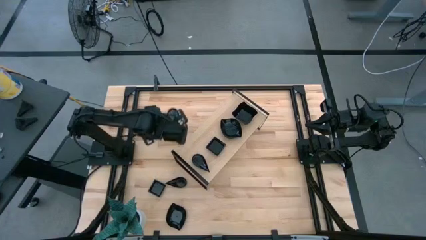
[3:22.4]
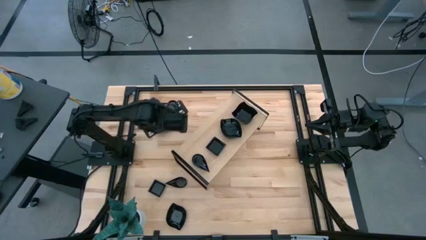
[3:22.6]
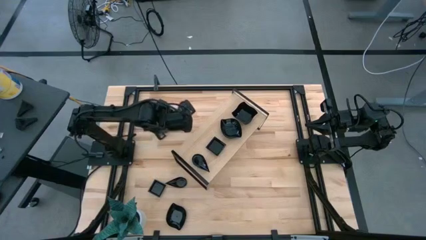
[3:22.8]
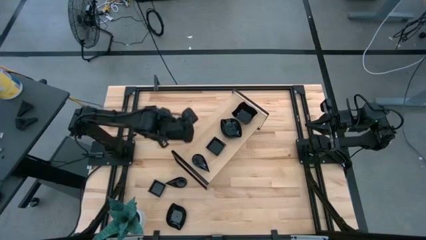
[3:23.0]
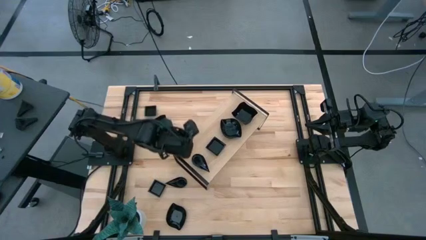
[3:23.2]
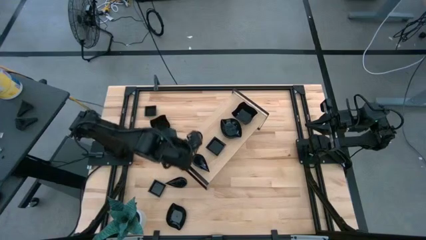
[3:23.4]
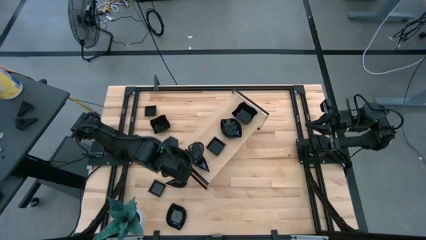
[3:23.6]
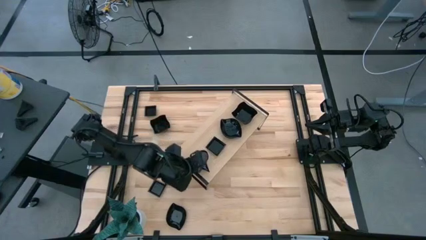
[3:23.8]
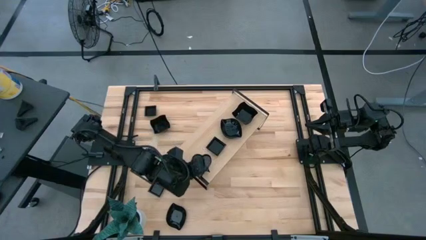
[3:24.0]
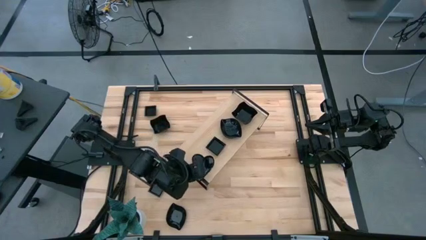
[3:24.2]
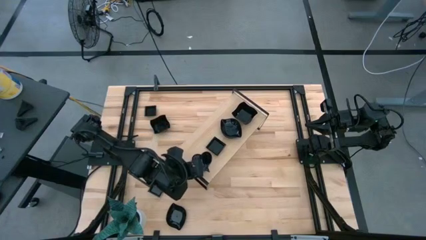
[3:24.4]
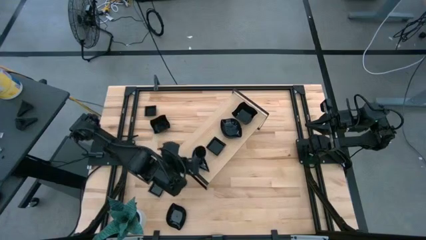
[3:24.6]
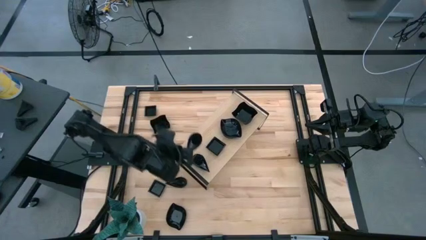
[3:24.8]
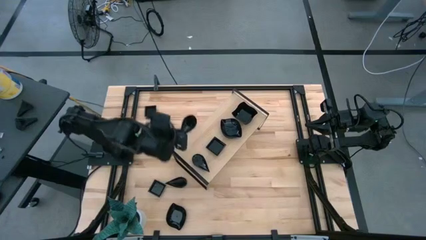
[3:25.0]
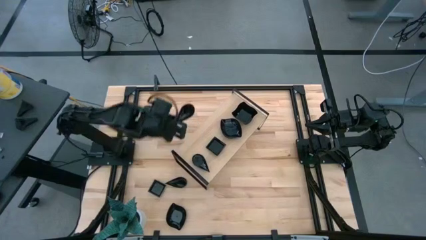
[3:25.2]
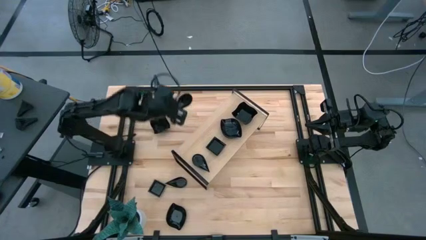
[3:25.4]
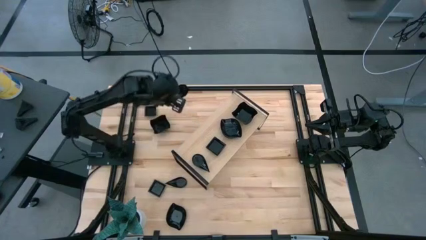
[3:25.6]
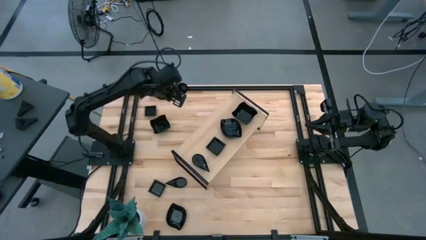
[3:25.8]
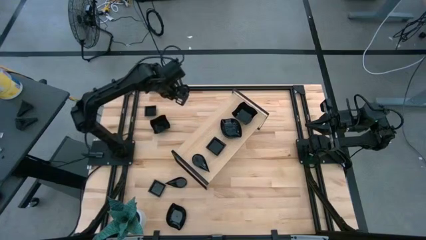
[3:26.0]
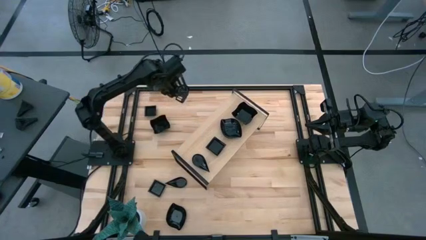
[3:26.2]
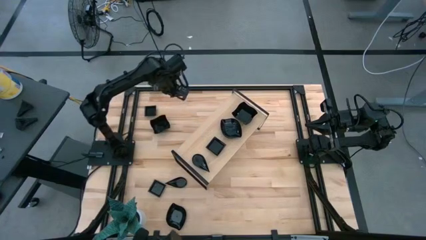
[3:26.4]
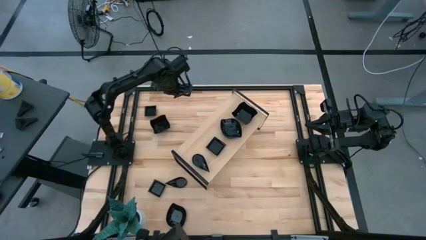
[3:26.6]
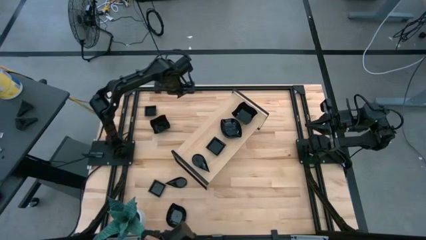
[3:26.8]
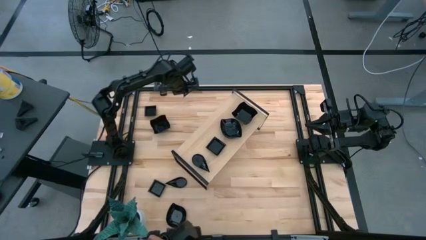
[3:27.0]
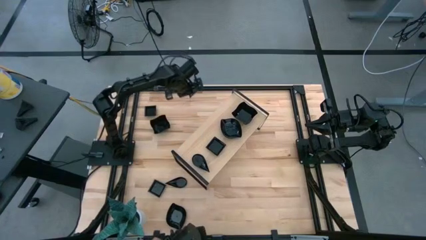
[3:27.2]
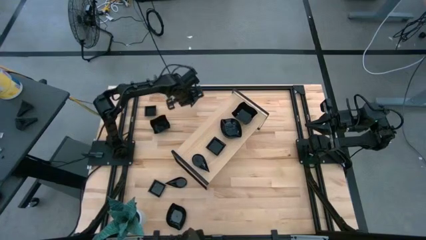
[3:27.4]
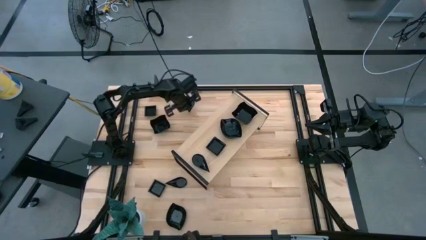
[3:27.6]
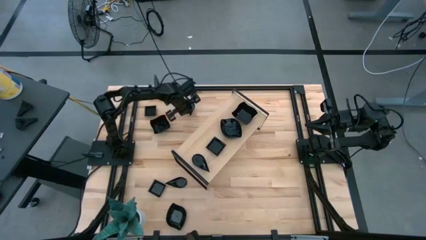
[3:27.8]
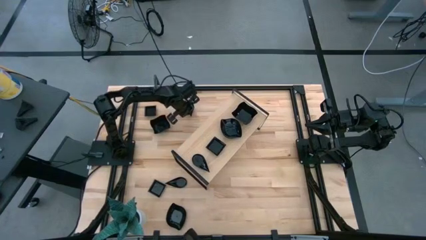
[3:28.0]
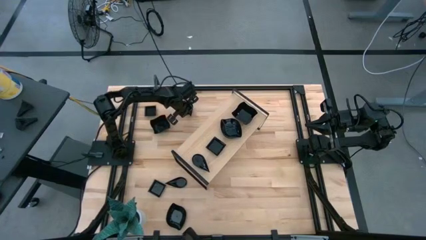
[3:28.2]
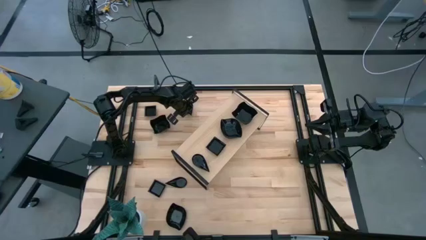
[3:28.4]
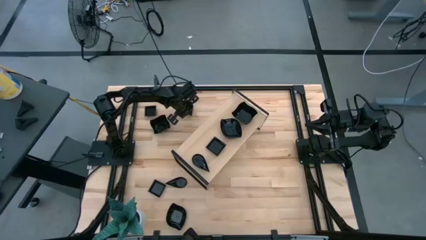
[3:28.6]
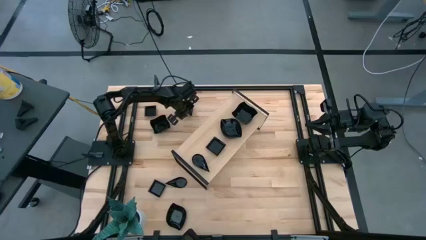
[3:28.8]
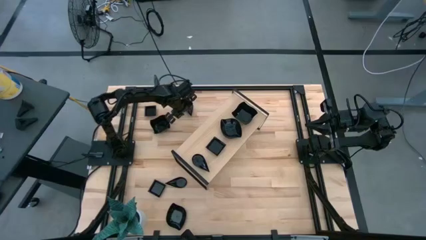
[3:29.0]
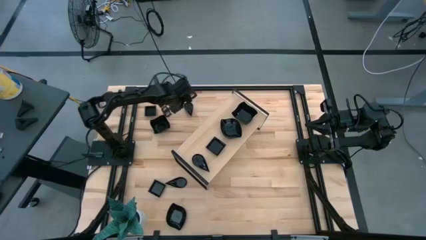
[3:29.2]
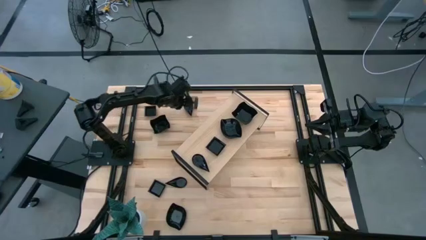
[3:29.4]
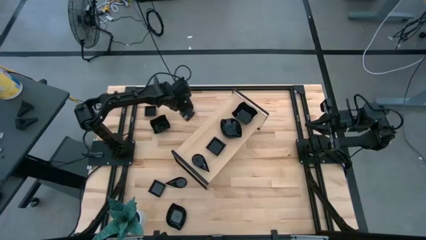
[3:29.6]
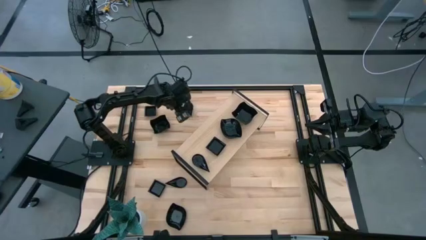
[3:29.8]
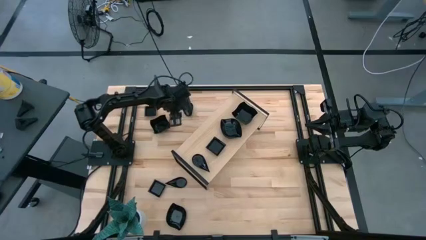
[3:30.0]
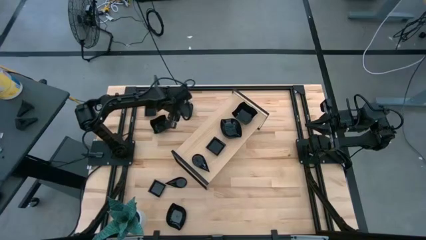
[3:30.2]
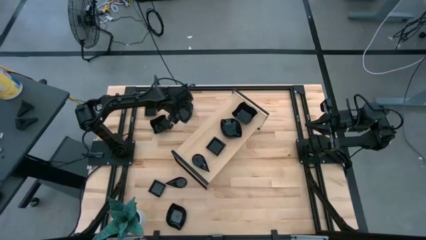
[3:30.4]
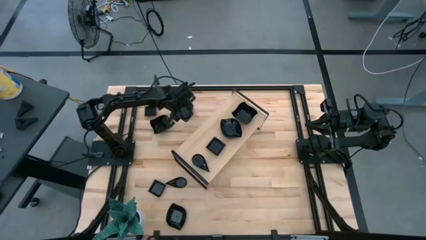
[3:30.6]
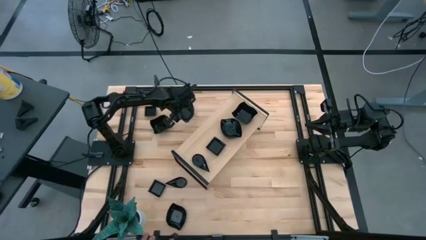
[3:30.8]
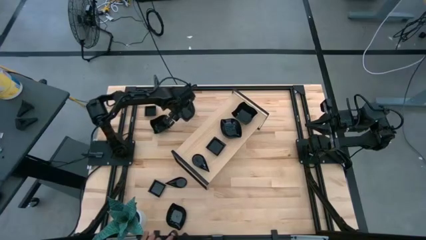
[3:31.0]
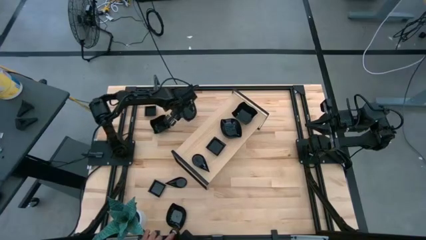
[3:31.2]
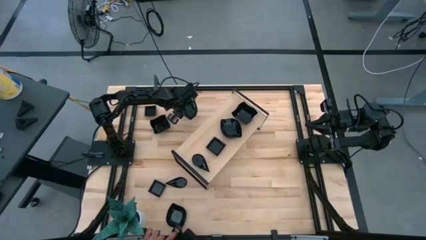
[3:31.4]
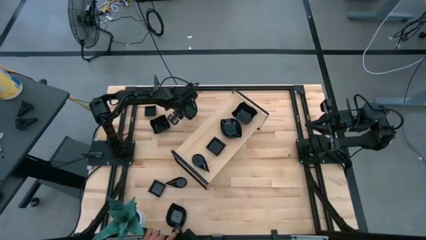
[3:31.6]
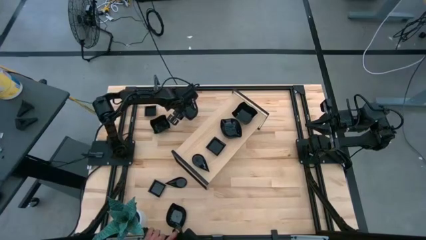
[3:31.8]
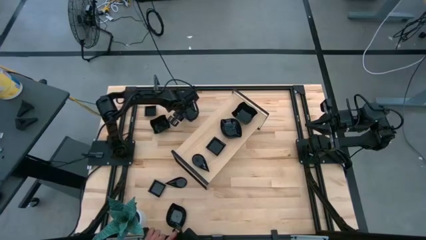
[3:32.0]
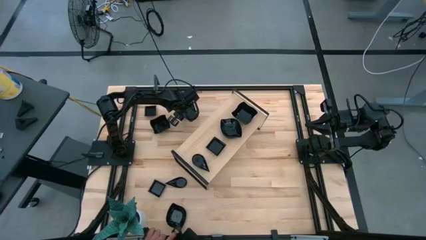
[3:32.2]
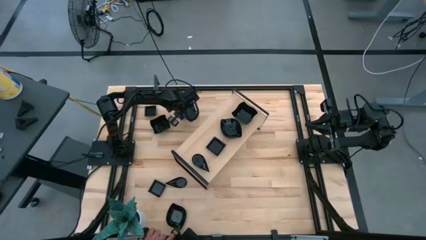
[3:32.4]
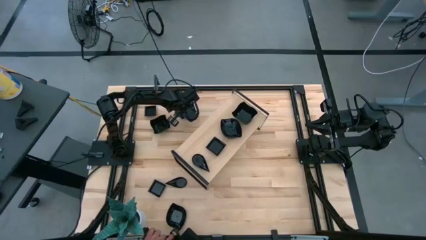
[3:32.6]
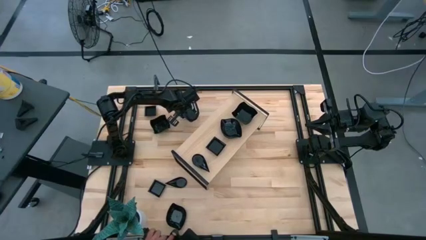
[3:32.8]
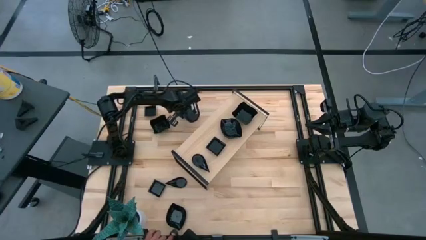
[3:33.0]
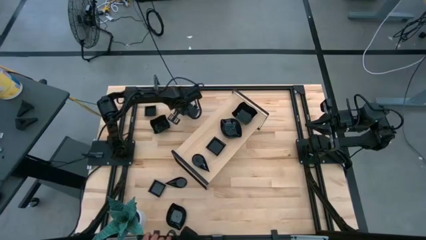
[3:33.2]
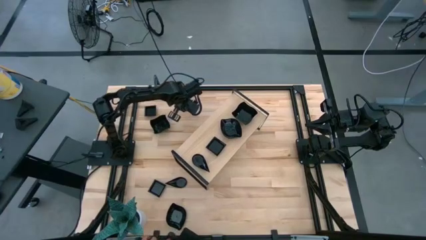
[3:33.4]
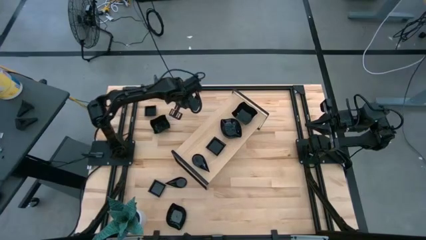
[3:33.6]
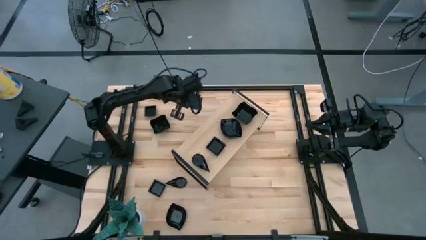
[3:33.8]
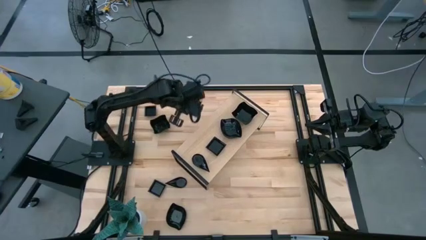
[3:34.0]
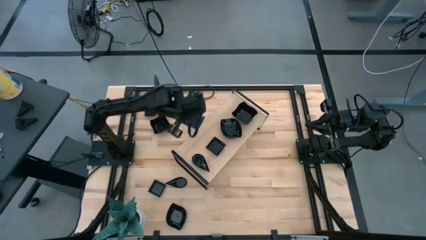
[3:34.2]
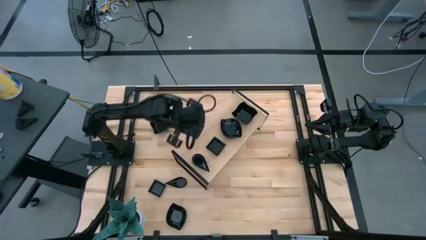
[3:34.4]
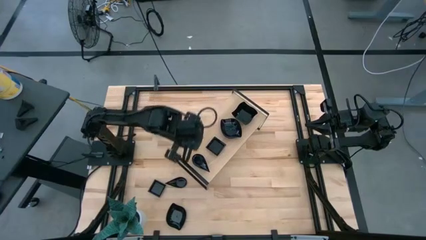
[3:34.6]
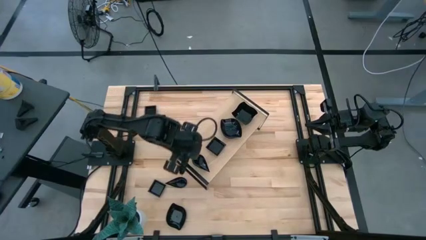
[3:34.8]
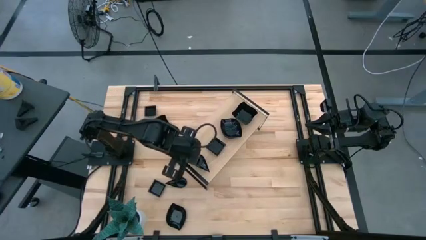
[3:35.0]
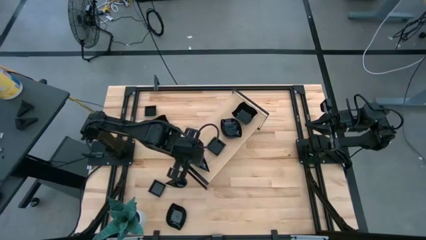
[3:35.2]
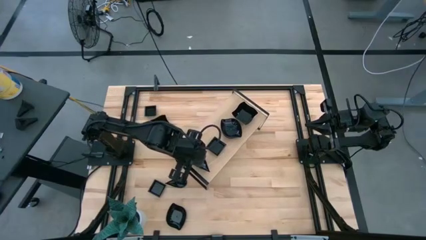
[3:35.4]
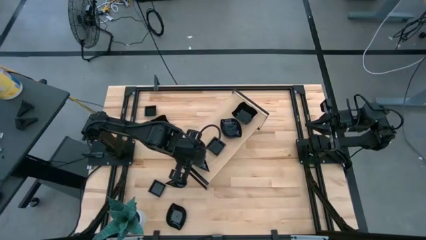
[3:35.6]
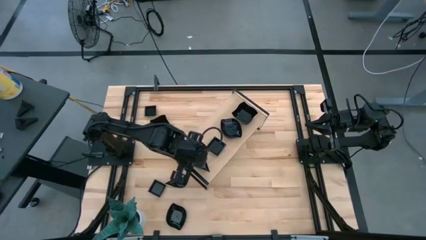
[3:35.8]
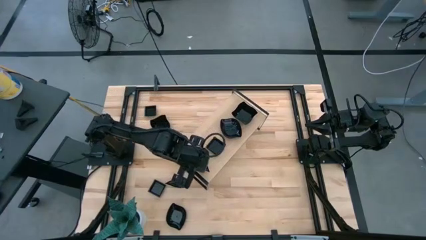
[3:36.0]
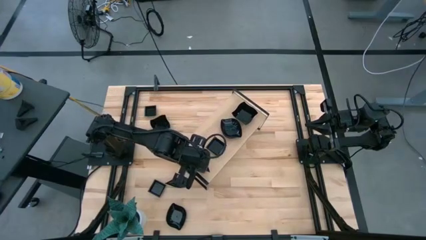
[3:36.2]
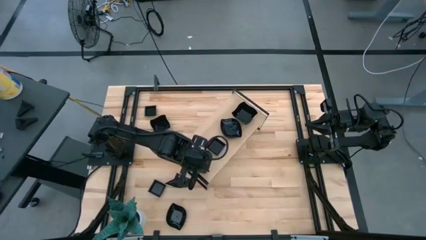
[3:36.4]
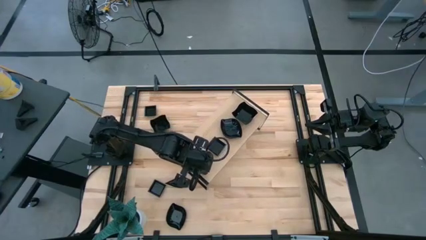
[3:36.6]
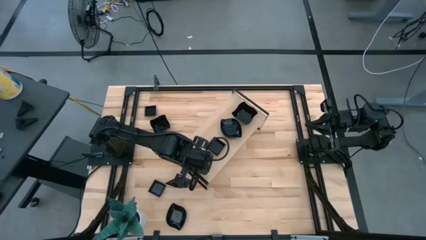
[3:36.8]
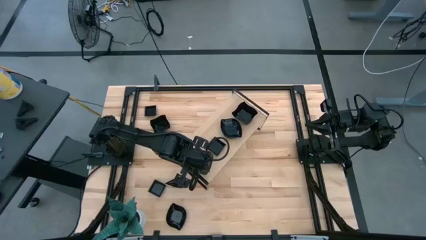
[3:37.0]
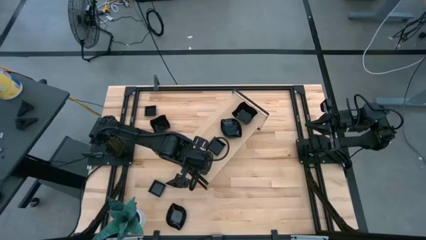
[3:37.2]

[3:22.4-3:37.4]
Task: Pick & Place Mini shaped plates
Stack the black teardrop shaped plate on top of the black teardrop shaped plate on the shelf
